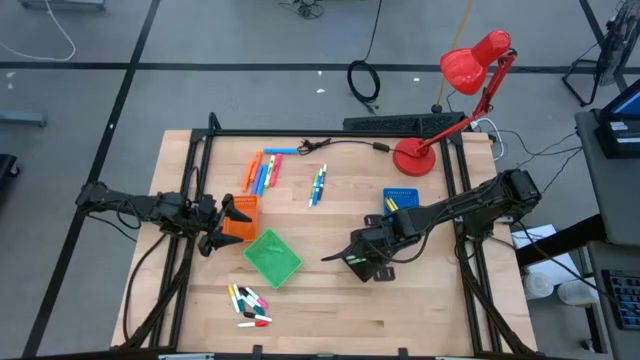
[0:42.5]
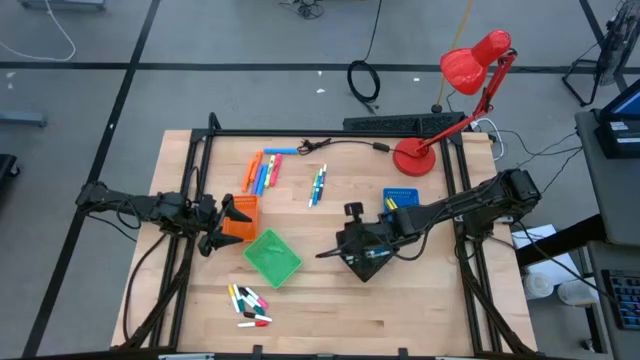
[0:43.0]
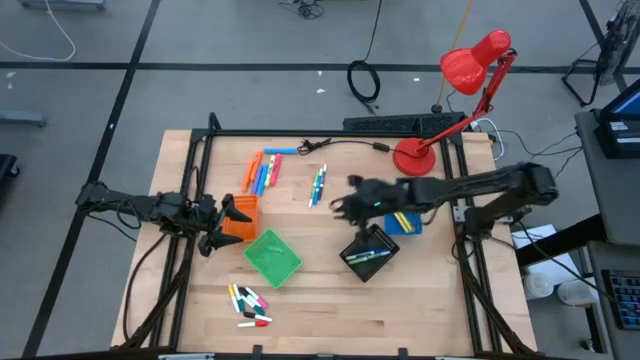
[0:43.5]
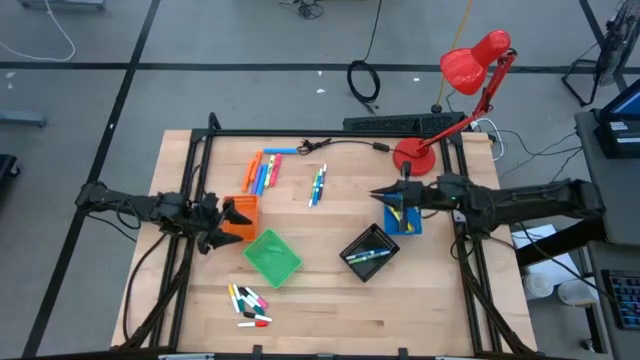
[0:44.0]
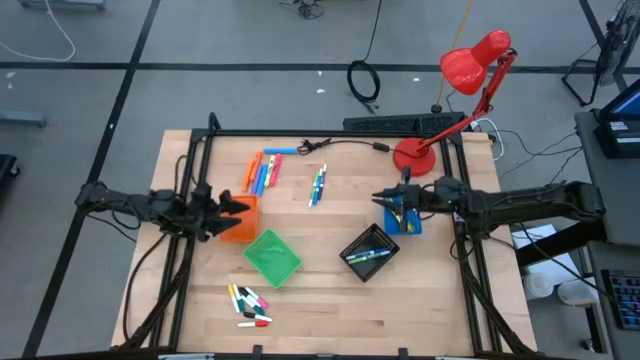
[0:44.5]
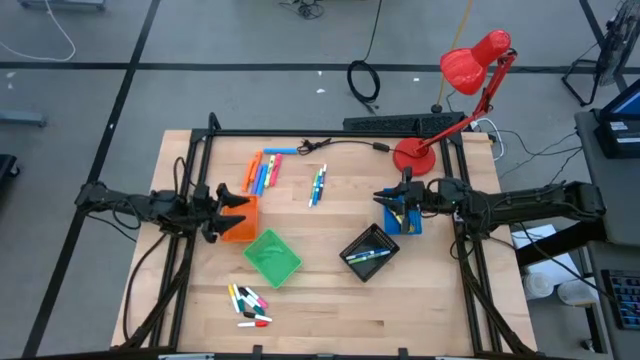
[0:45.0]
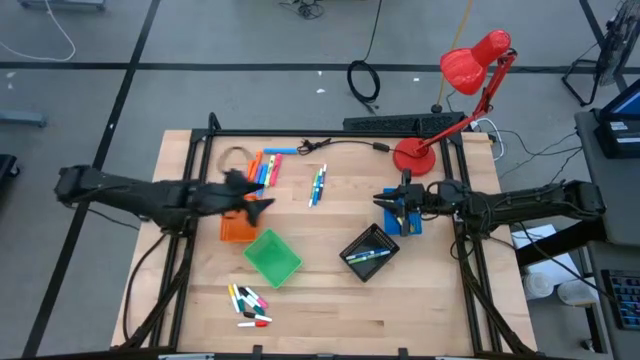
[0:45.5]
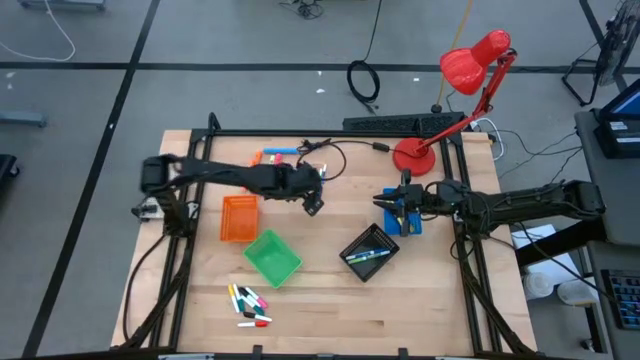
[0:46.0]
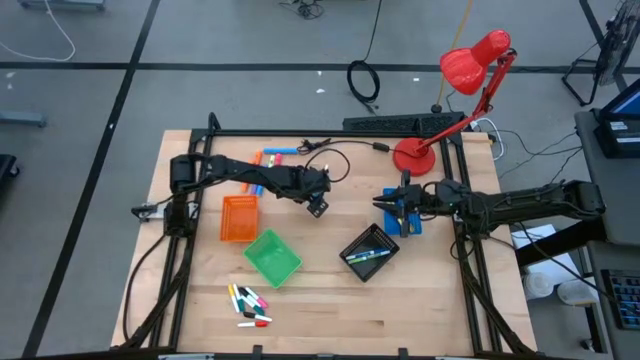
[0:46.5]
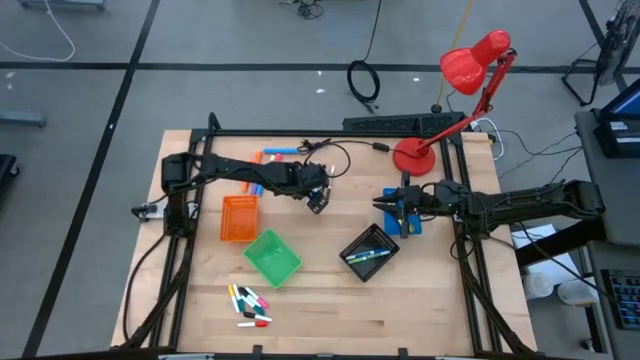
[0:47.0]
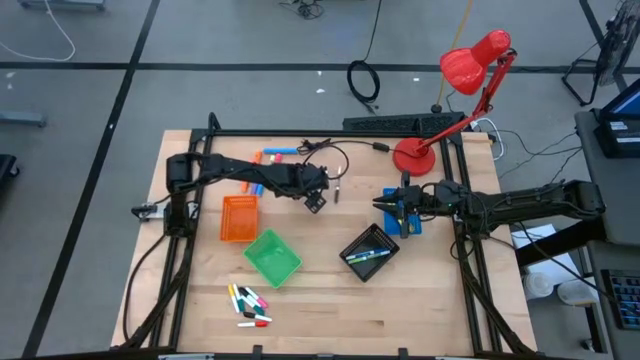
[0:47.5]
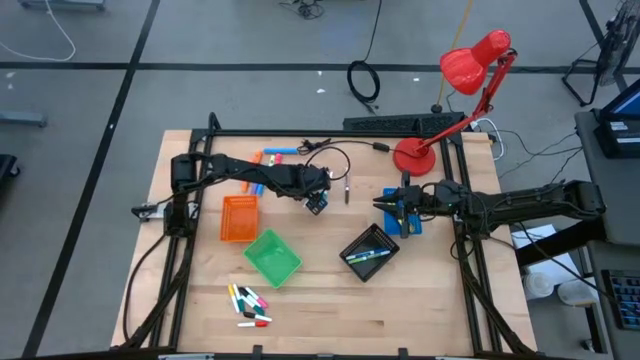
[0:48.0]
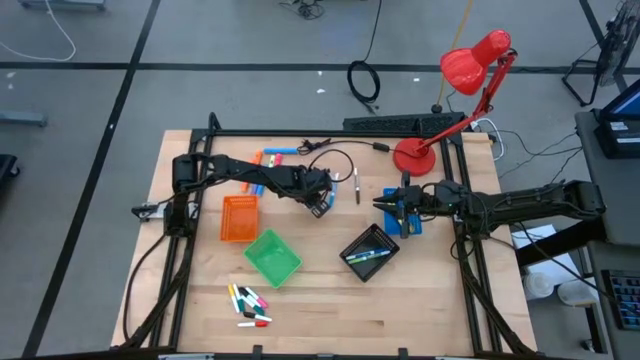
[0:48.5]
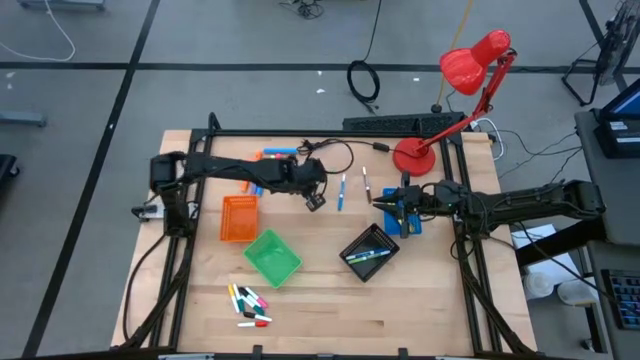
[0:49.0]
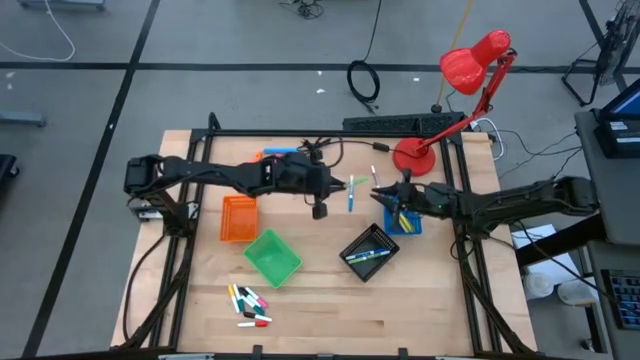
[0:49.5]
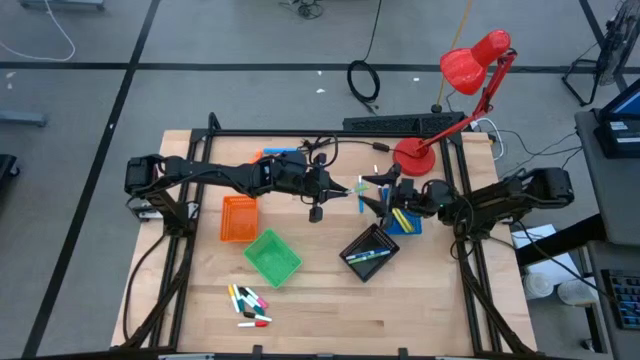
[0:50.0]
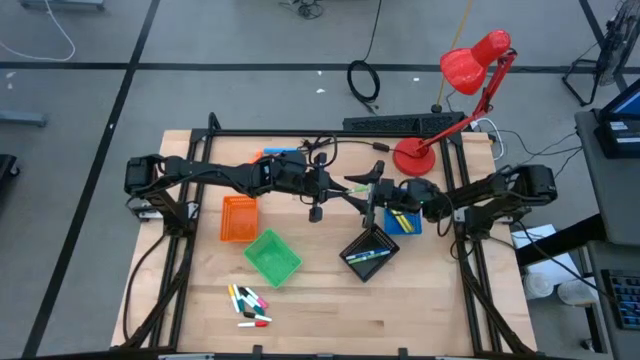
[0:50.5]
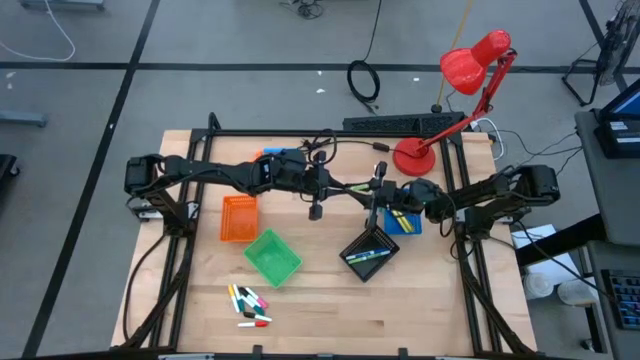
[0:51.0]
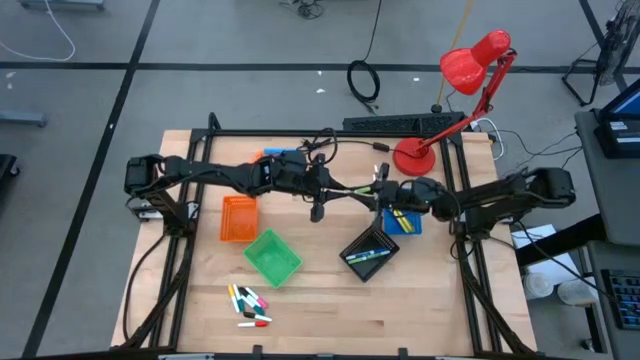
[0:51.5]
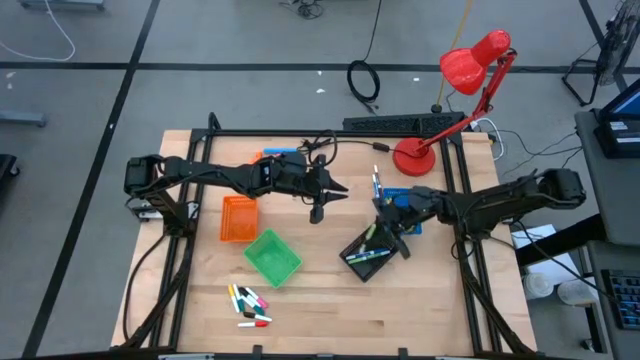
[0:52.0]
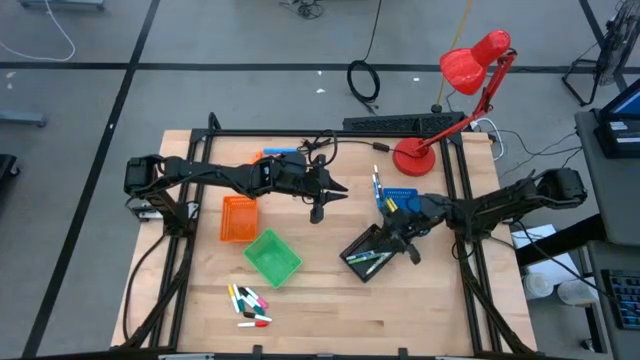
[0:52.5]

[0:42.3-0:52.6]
Task: Pick & Place Markers
Put the green marker pen into the black basket

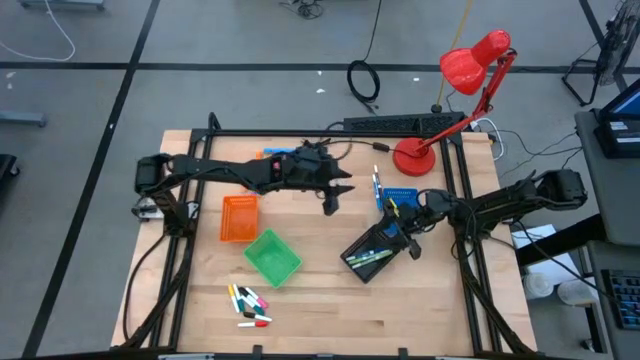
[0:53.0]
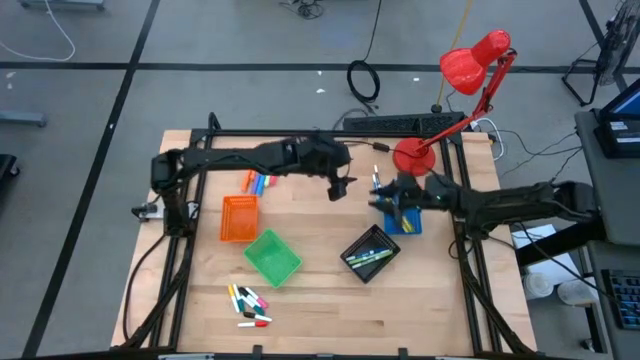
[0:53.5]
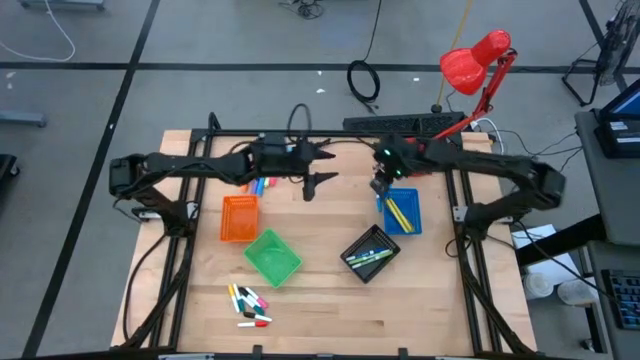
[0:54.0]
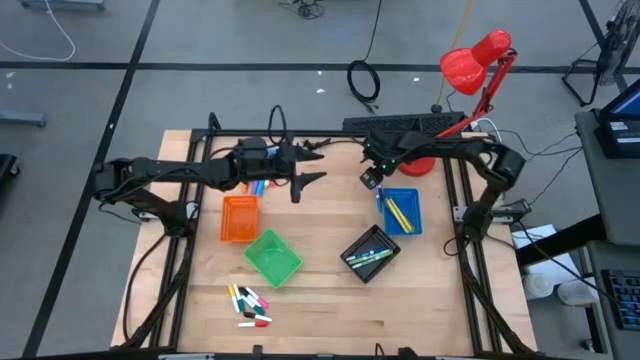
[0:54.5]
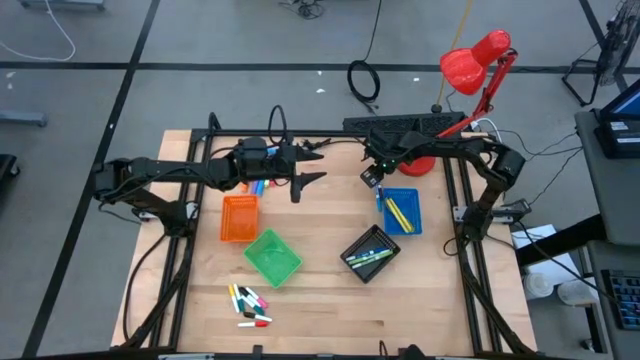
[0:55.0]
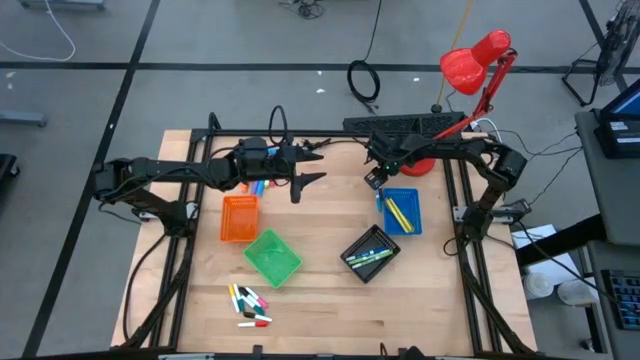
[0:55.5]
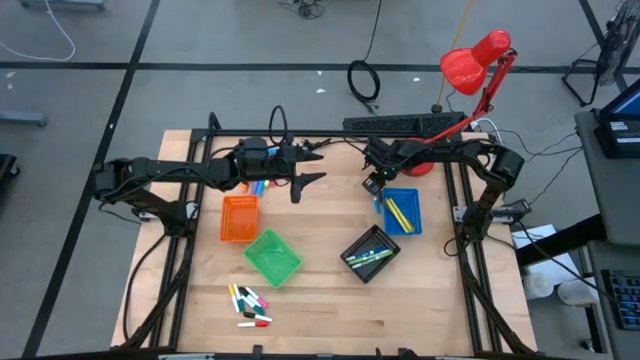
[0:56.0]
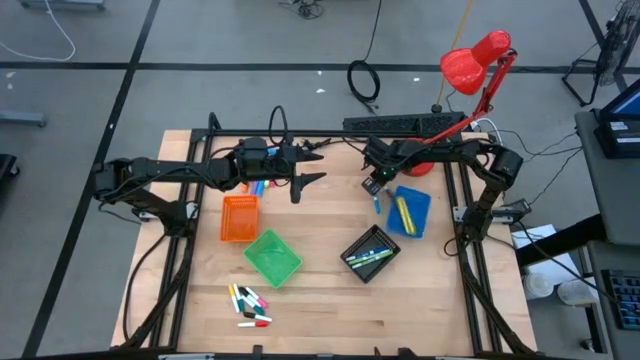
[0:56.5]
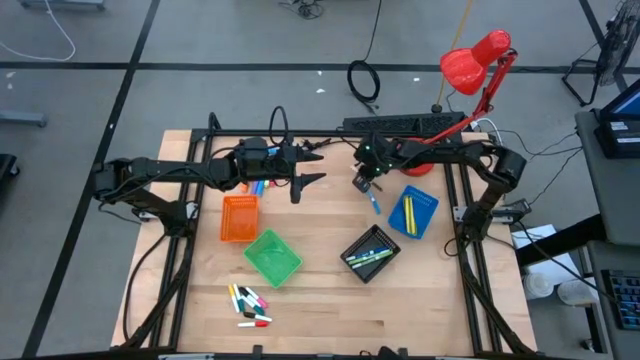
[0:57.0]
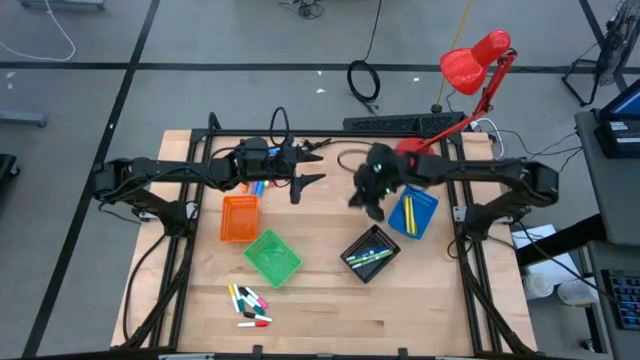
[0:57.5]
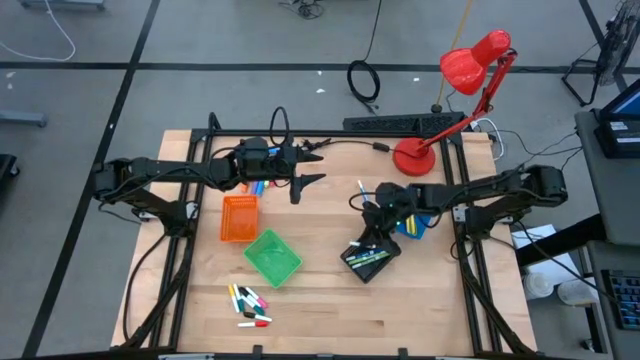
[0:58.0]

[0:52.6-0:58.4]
Put the brown marker pen into the black basket

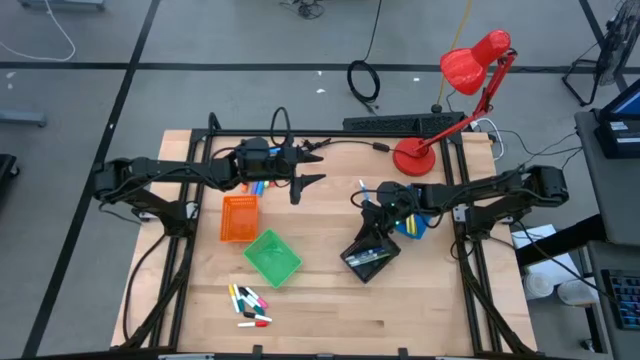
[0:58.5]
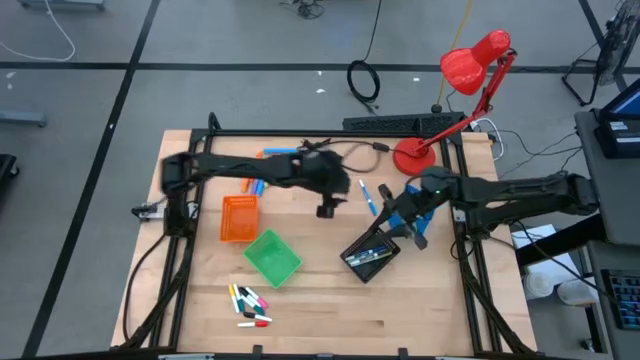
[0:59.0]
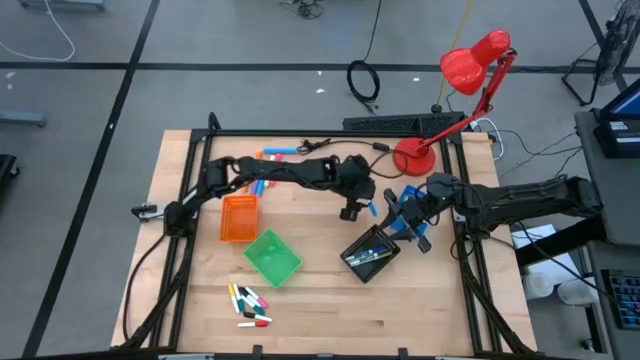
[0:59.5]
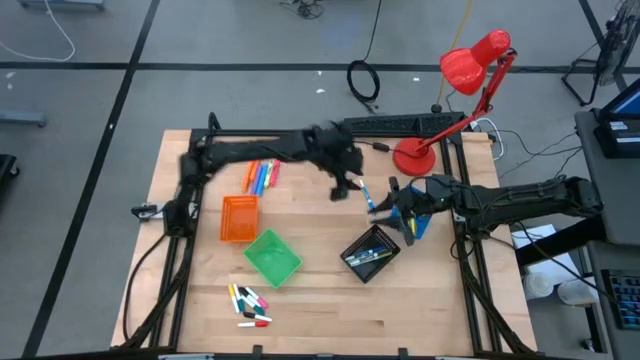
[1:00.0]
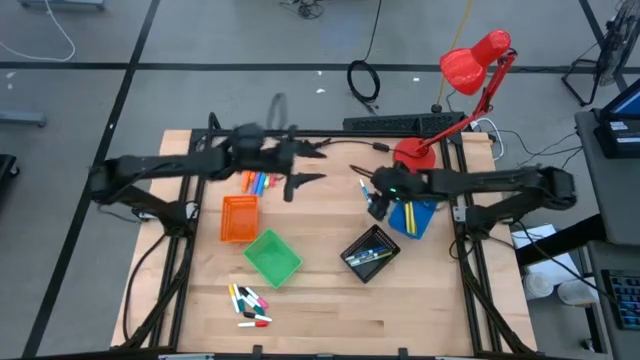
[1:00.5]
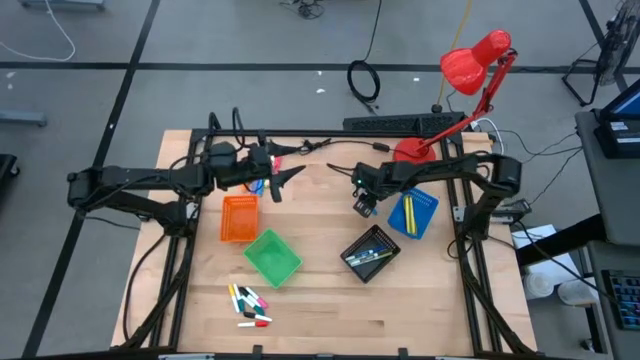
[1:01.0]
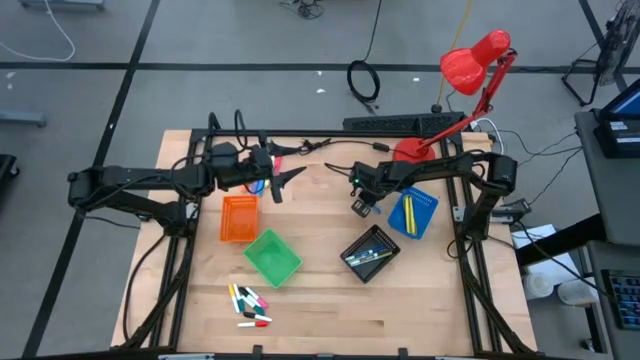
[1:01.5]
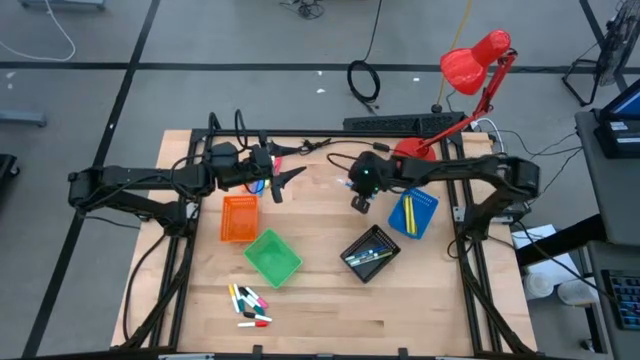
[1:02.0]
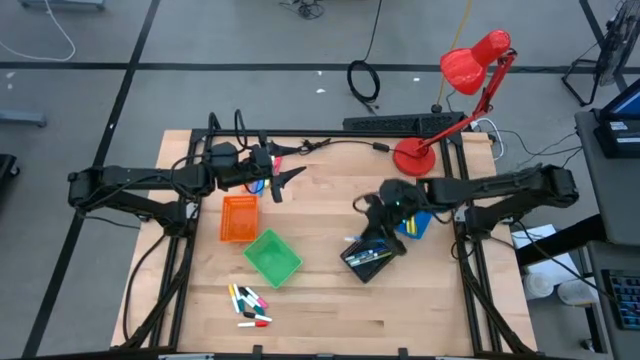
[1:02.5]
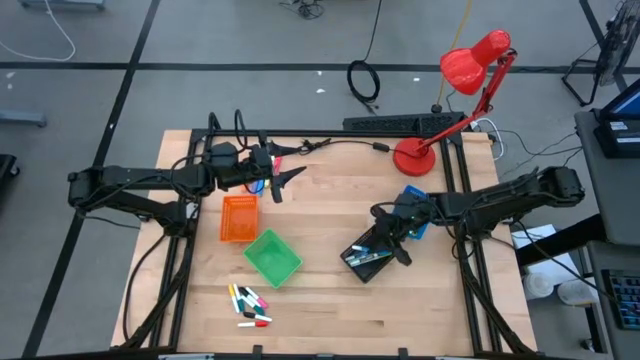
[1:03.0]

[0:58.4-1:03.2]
Put the light blue marker pen into the black basket
